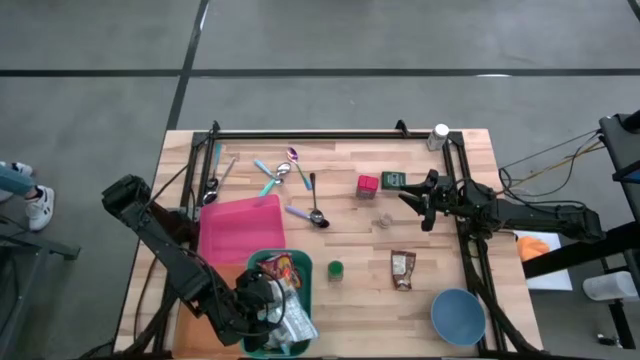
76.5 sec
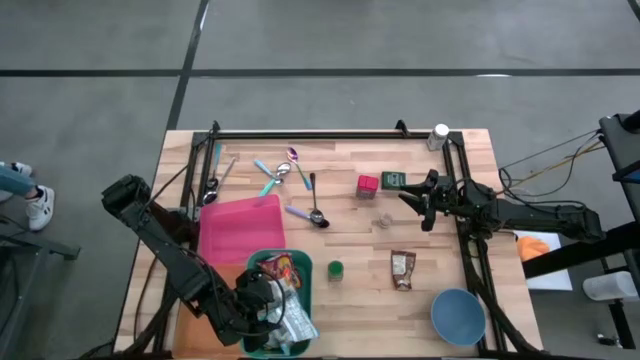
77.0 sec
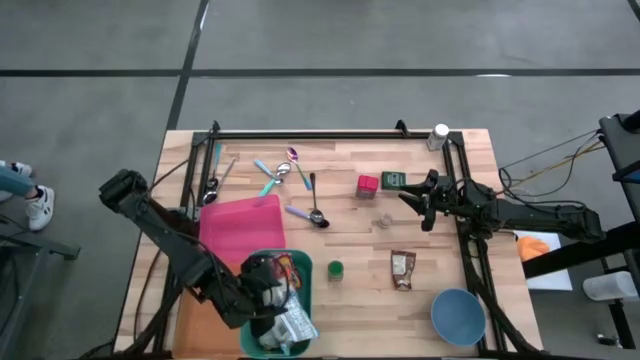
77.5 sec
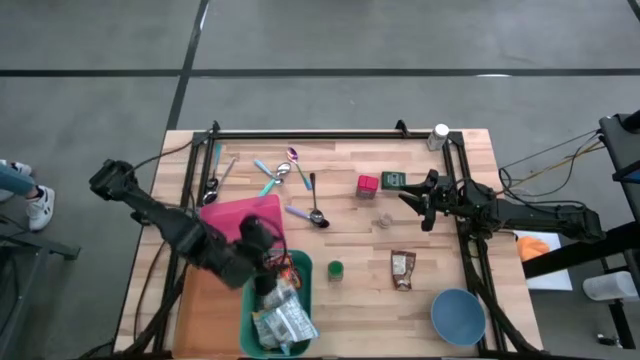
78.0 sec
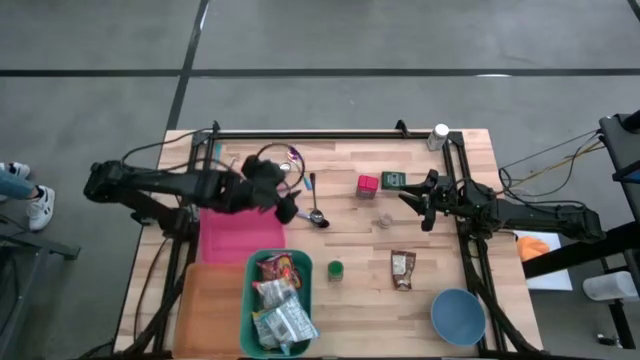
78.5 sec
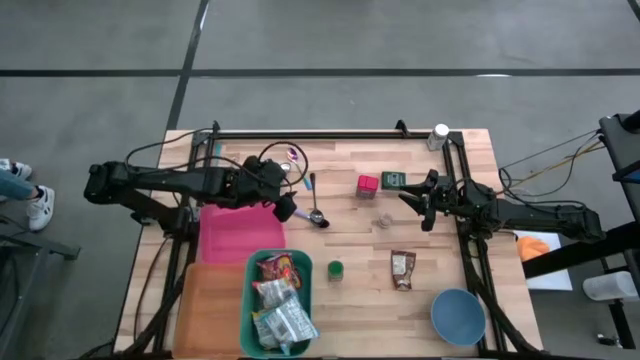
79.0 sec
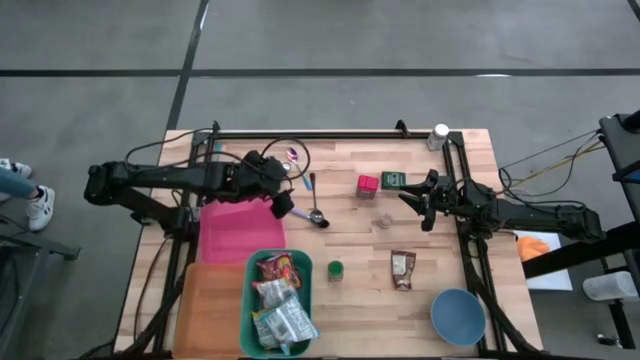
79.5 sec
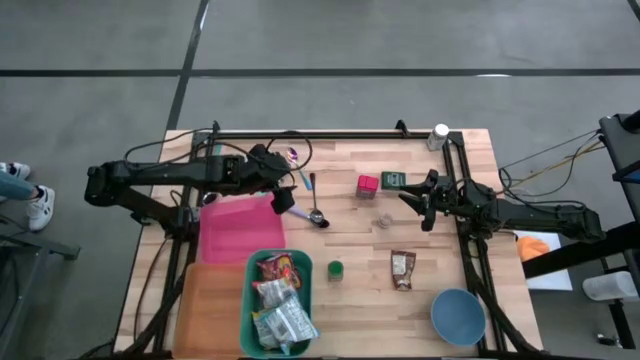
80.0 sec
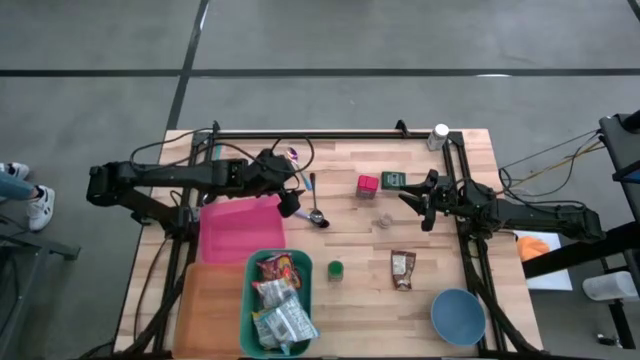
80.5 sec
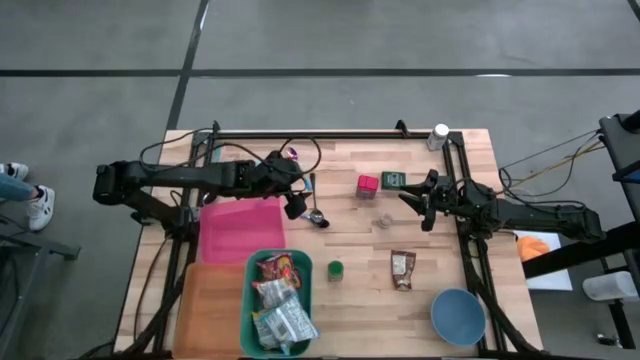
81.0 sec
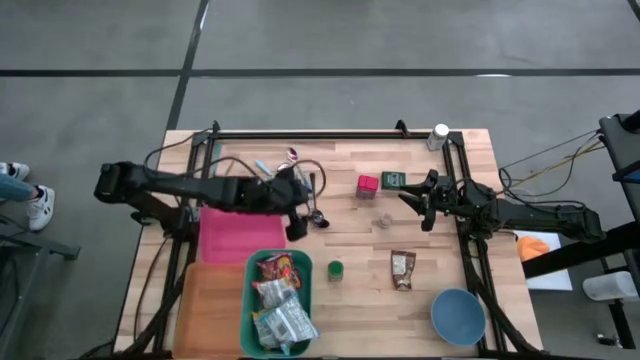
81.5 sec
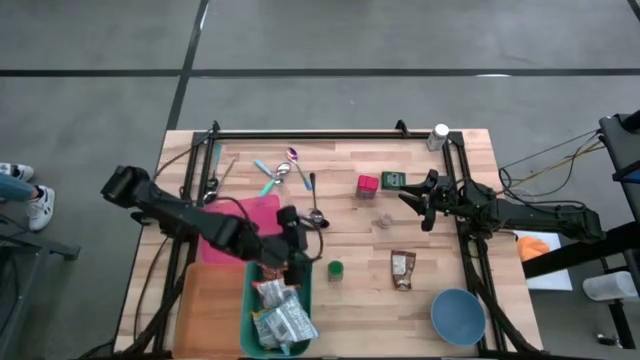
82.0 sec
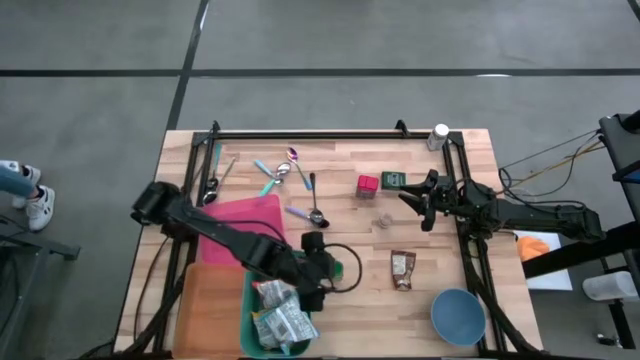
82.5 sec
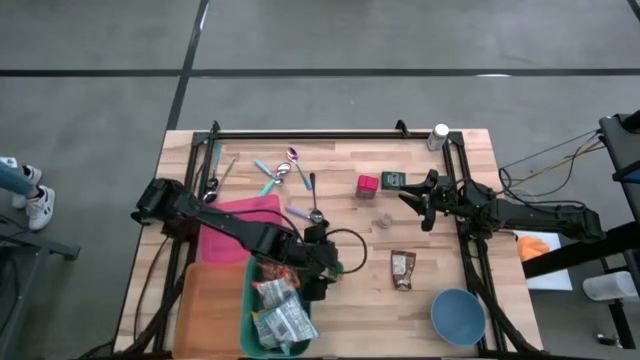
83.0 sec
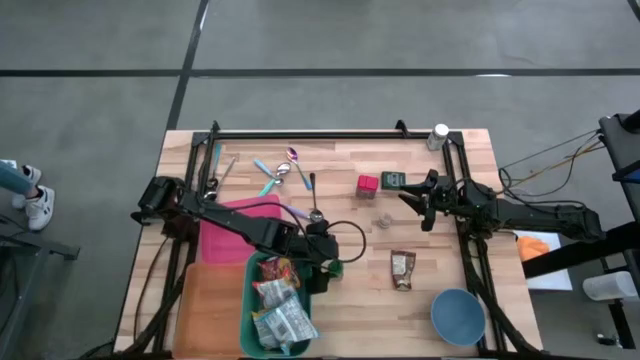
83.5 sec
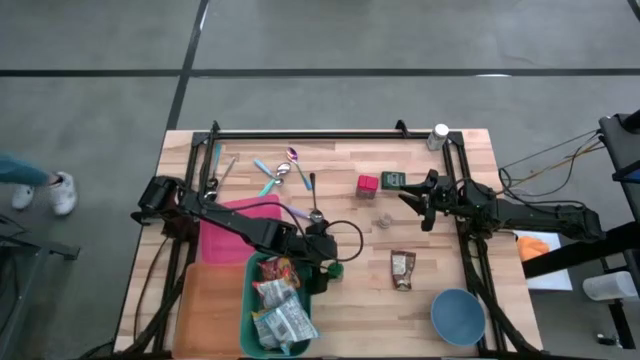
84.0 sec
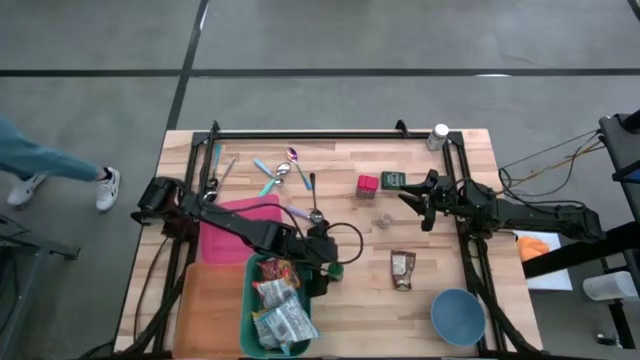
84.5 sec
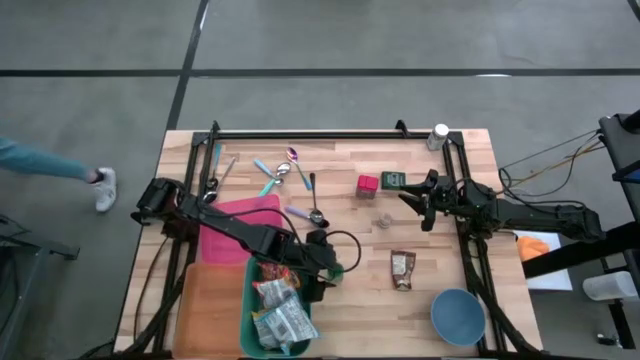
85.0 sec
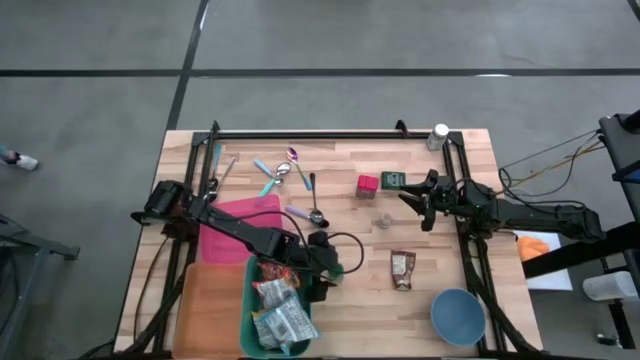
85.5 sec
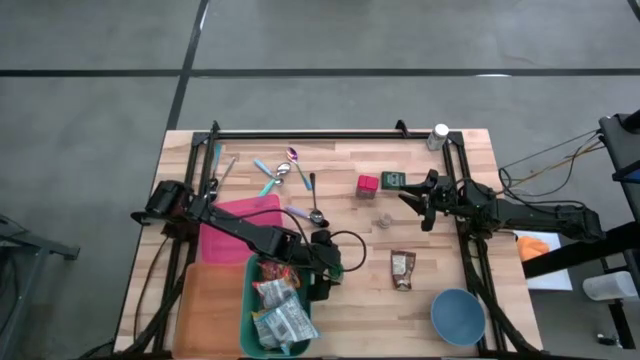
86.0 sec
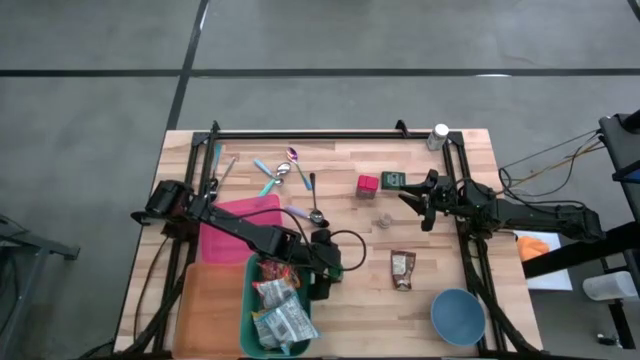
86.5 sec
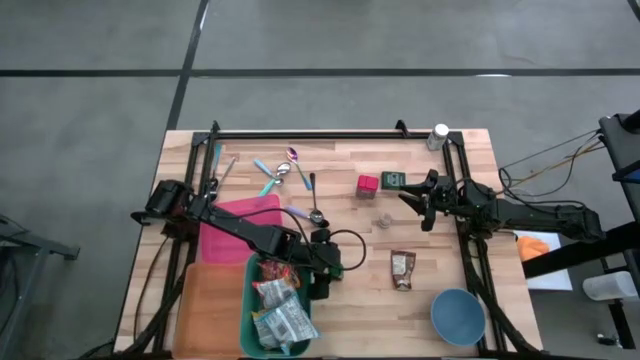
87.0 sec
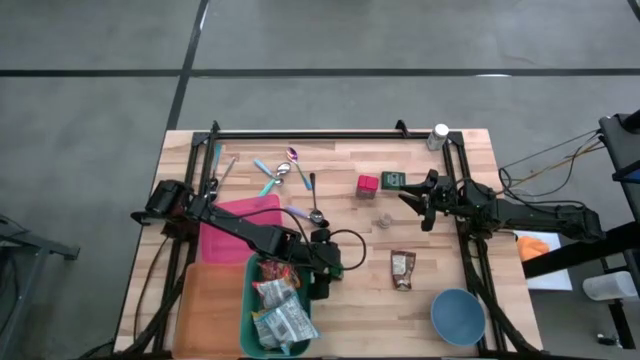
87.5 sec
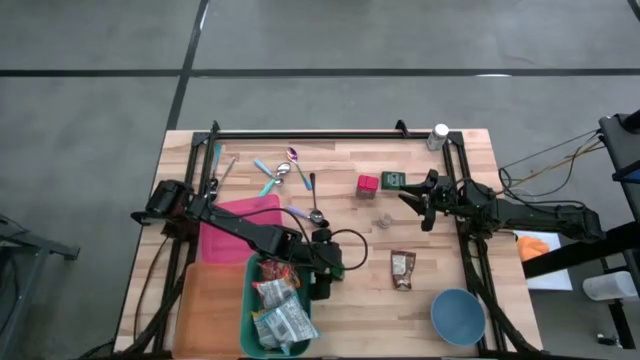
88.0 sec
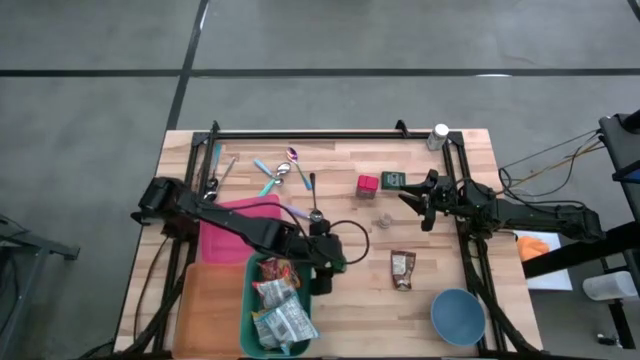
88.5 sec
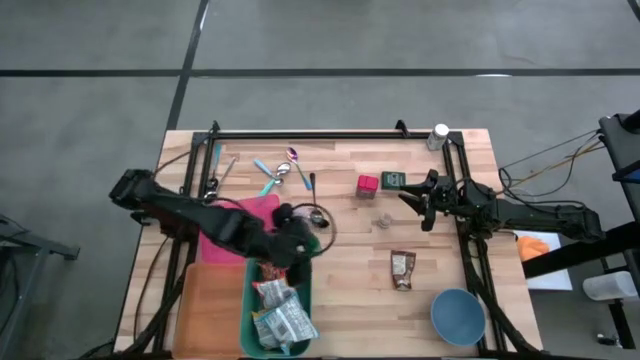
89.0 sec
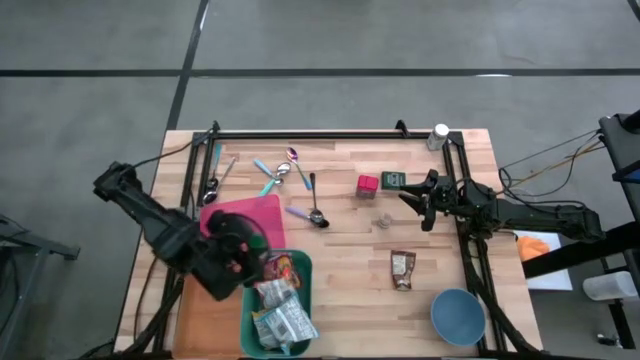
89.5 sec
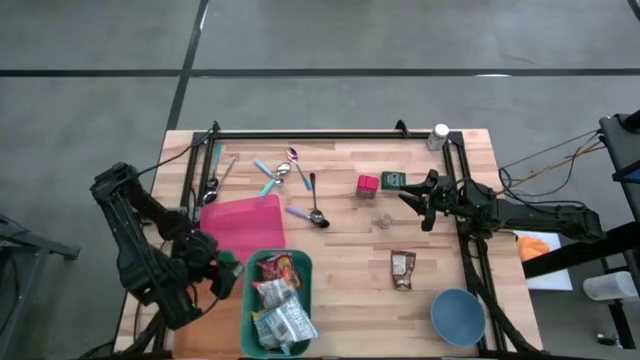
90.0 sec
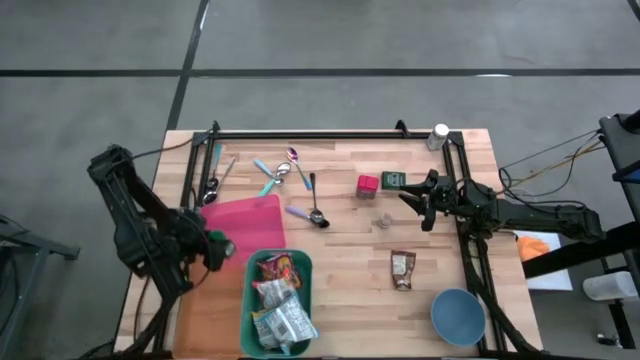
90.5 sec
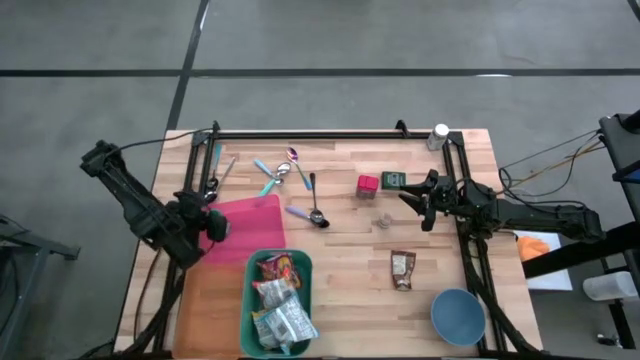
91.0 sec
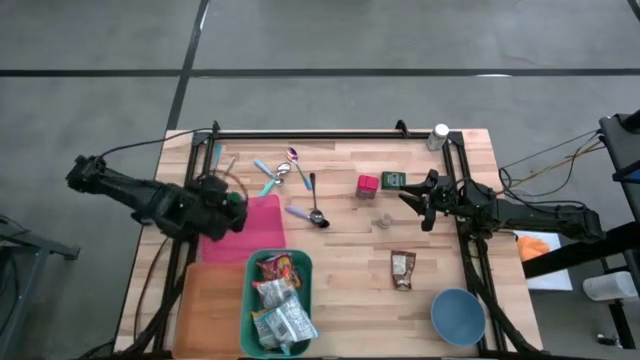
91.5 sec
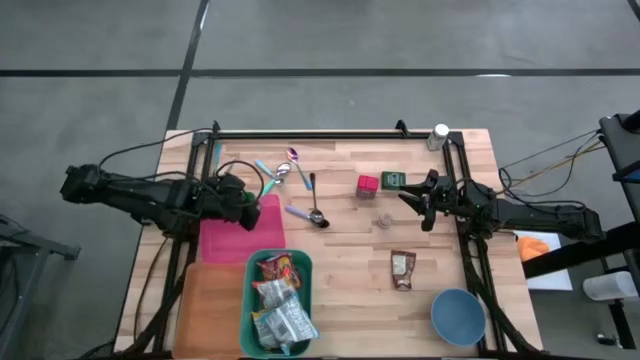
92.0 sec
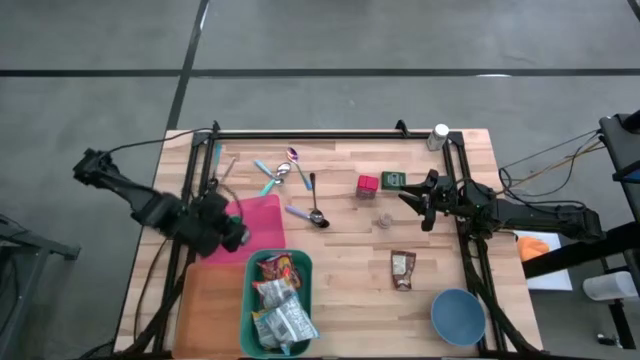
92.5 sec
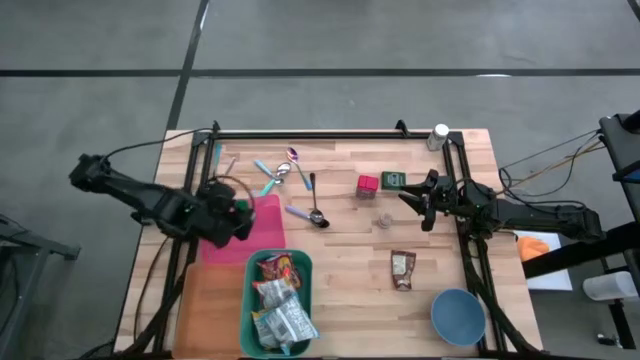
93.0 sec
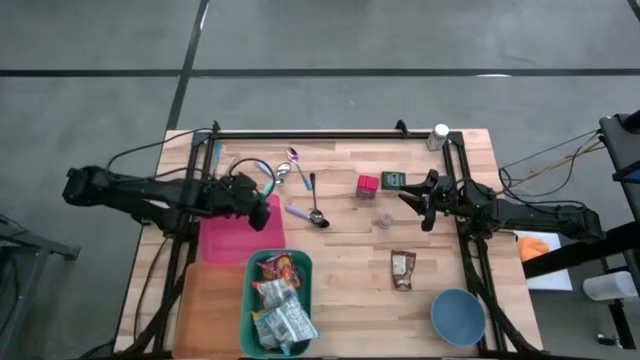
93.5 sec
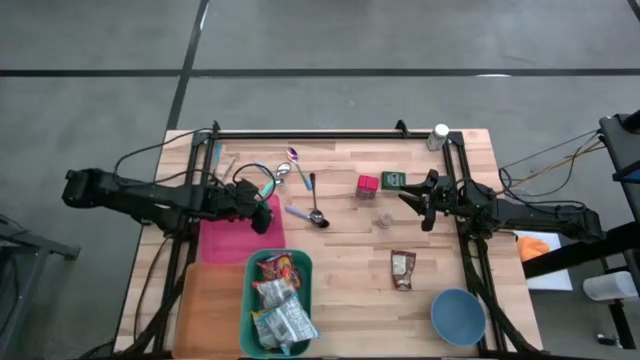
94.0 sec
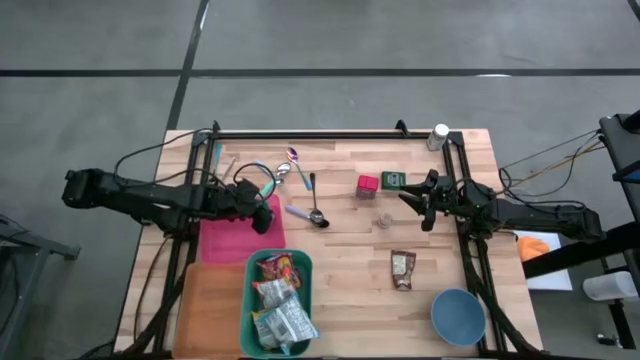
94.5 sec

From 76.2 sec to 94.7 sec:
Put the green seasoning bottle into the pink bin
